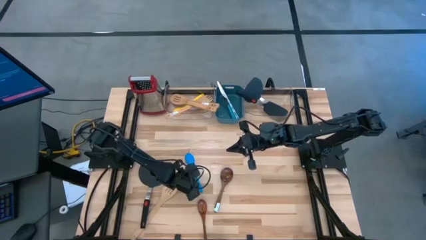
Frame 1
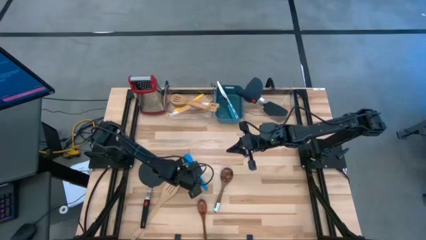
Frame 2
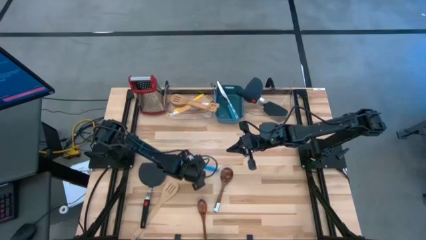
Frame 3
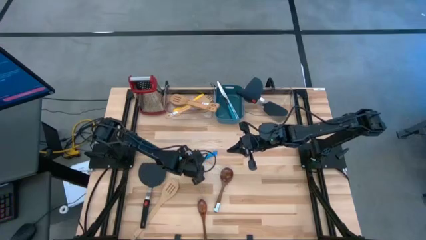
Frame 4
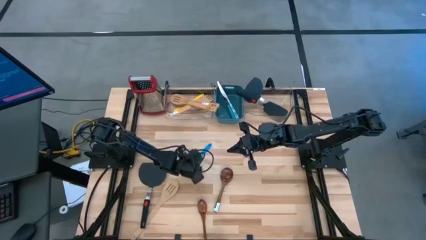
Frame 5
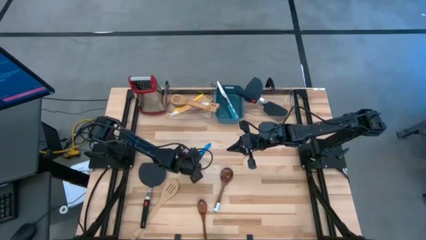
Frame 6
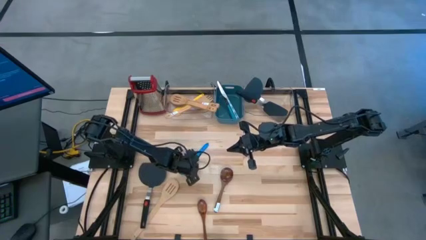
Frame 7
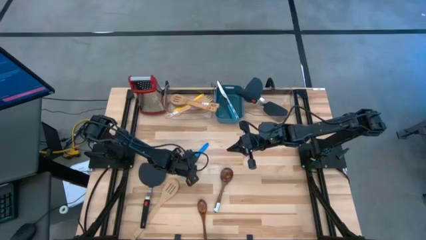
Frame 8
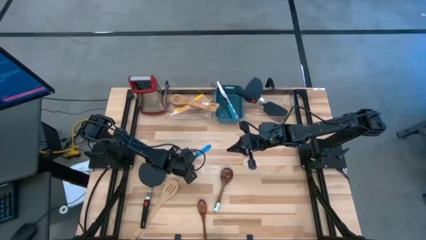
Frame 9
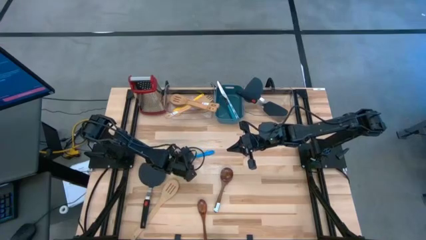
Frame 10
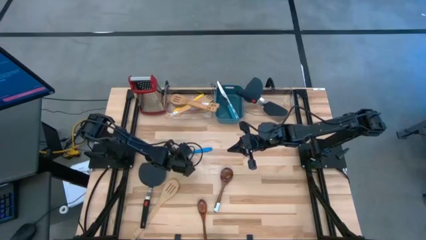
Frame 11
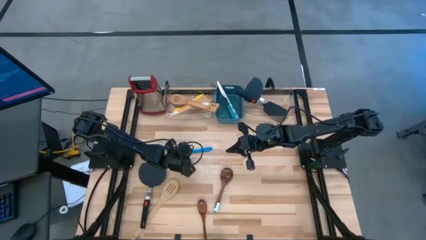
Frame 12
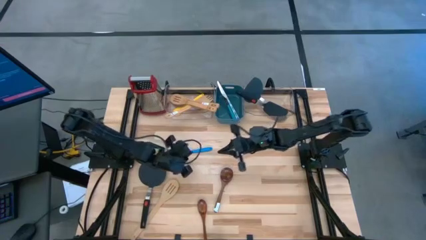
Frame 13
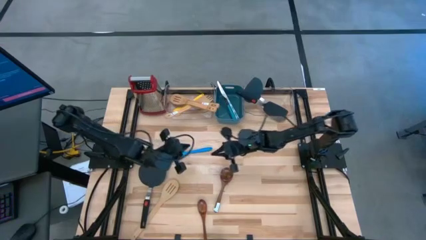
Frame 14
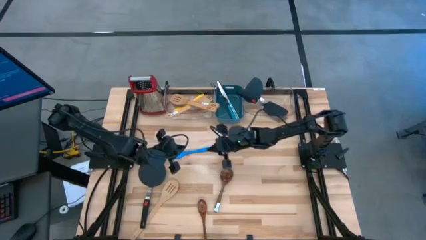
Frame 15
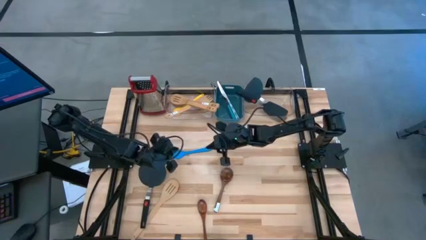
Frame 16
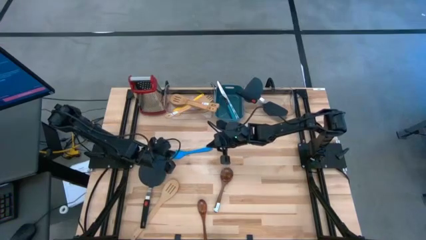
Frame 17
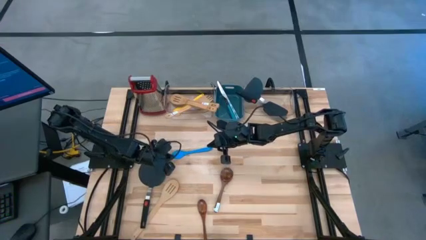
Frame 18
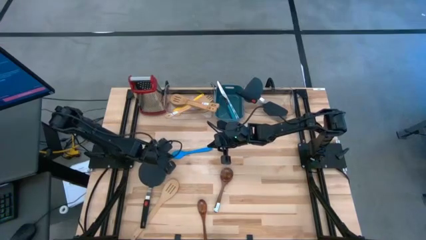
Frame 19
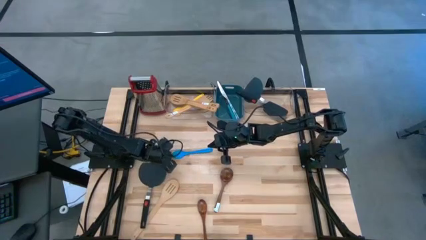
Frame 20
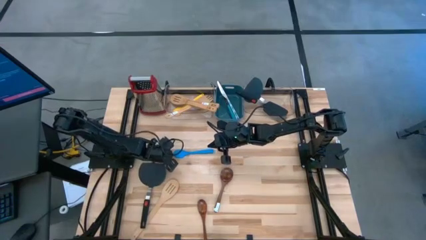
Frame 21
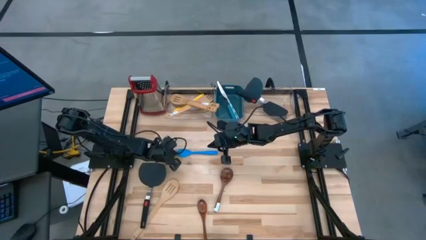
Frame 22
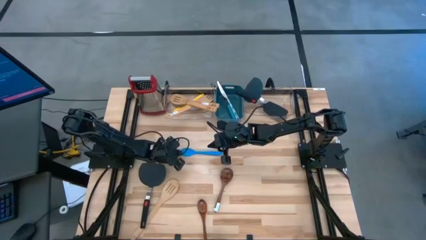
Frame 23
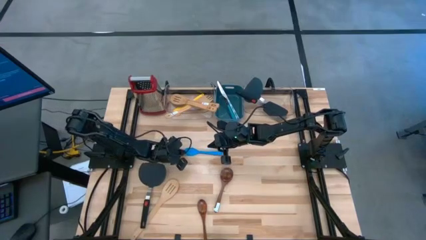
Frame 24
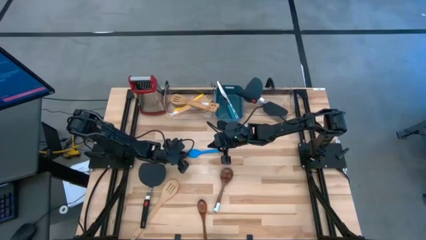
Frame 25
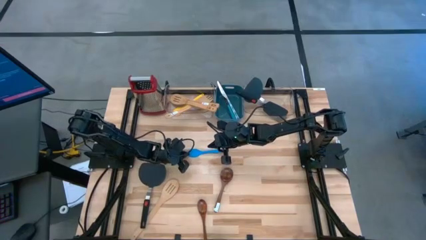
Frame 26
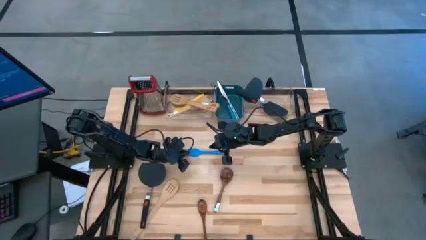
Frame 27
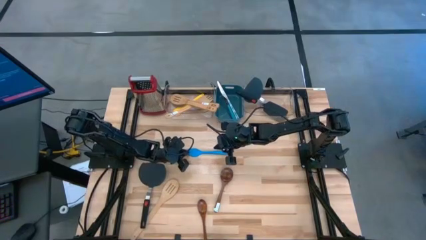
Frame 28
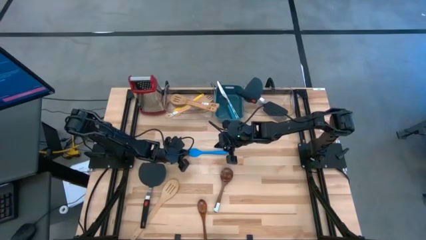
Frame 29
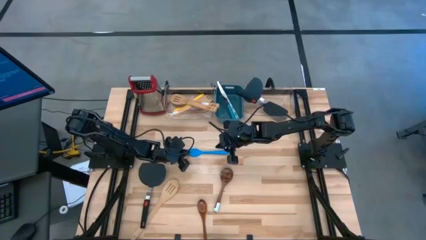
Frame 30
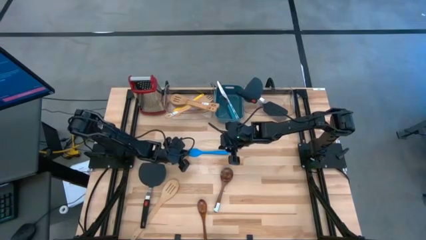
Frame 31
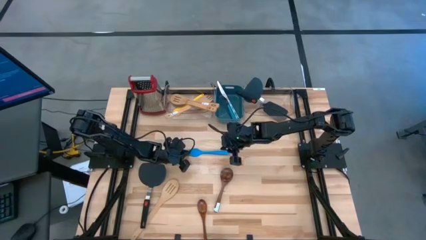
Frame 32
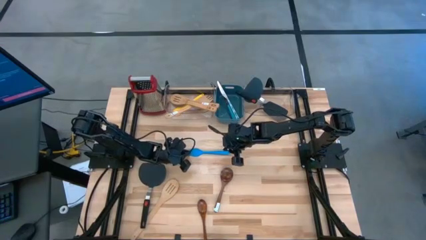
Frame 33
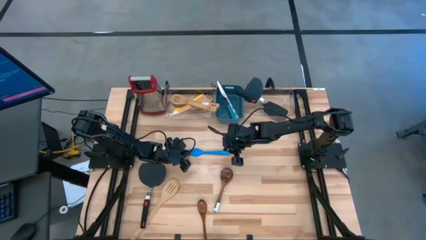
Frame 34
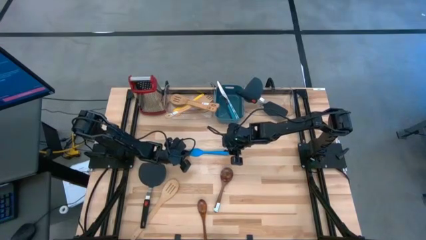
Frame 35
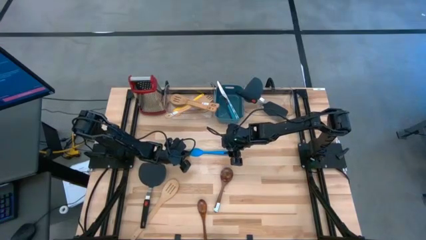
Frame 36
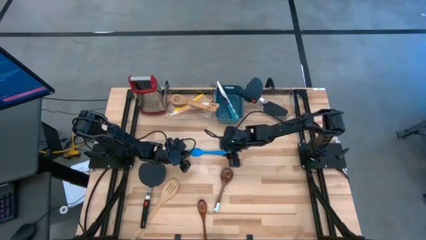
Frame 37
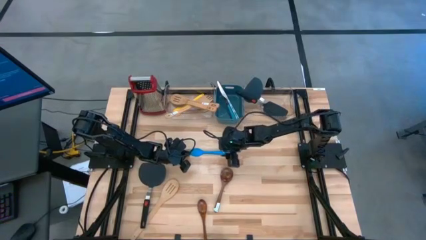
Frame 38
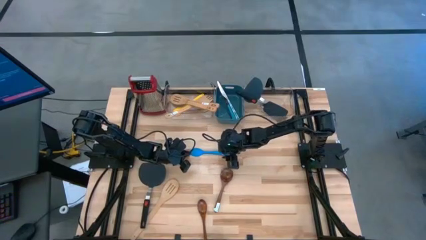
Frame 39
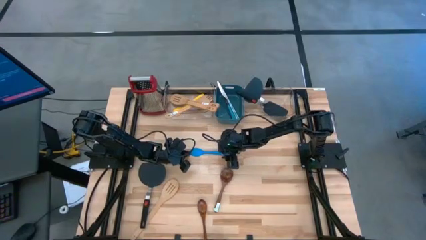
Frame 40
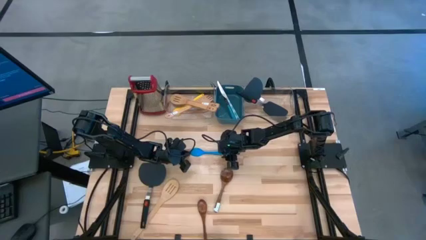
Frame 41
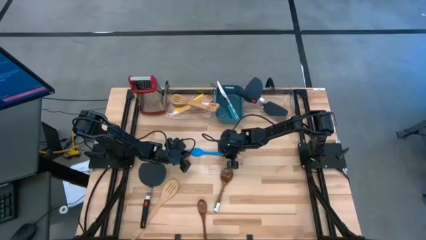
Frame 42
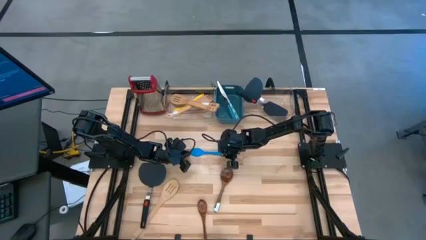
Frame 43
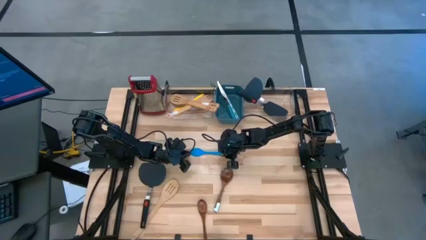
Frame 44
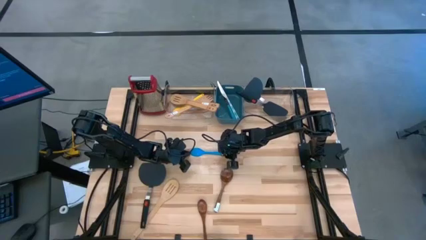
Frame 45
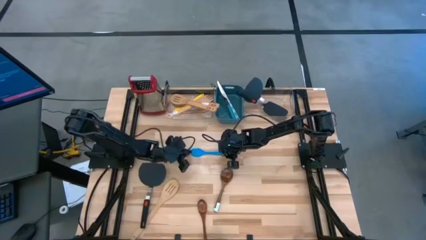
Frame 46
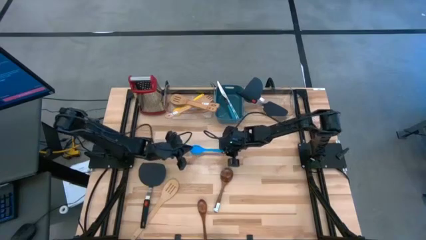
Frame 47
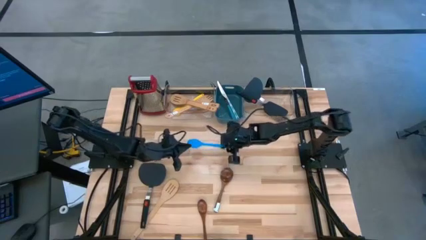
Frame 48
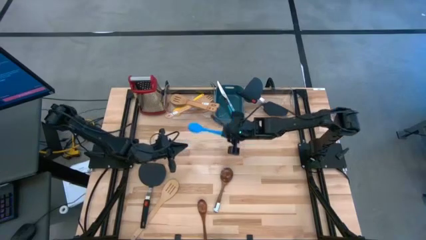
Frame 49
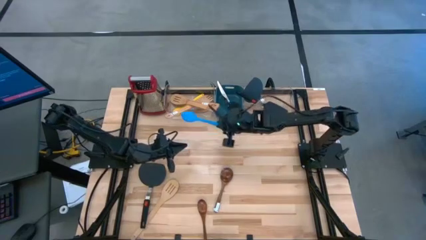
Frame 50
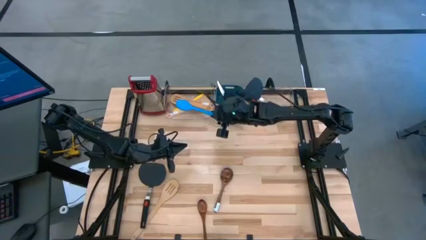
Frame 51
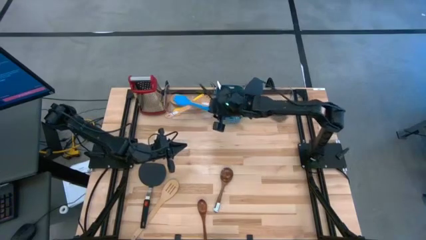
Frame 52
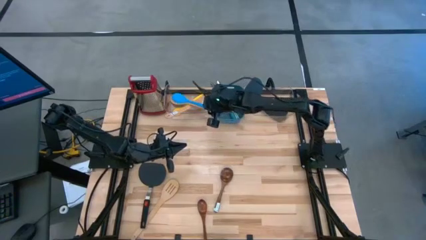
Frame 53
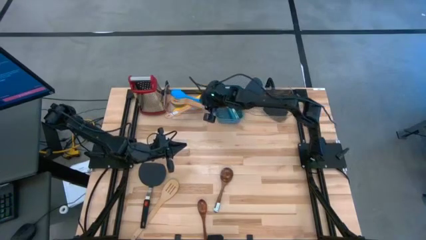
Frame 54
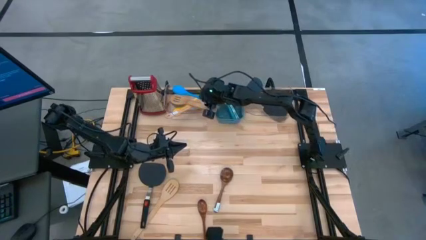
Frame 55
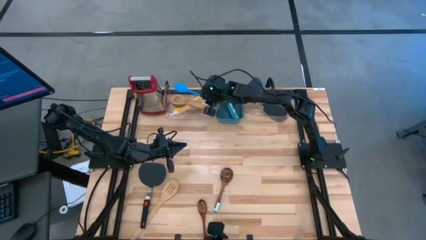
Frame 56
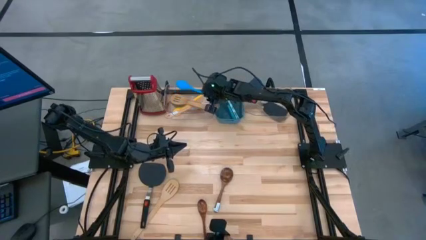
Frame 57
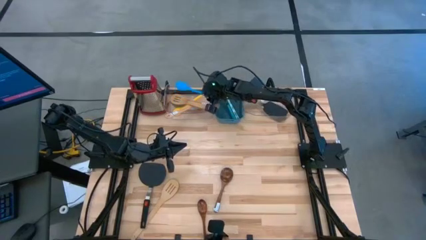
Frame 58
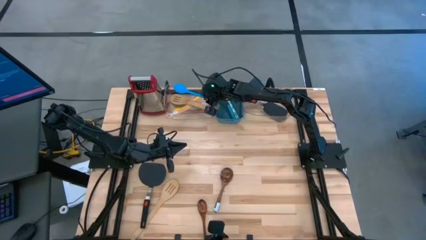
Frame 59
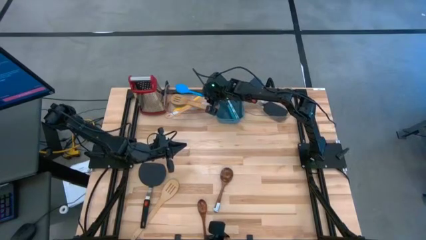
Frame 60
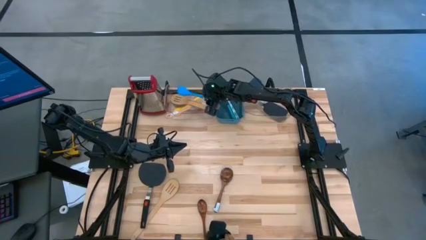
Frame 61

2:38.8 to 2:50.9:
Task: Pick & Place Kitchen Items
Put the blue serving spoon into the left transparent bin

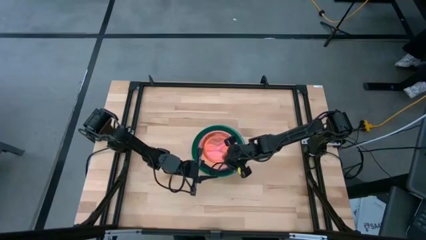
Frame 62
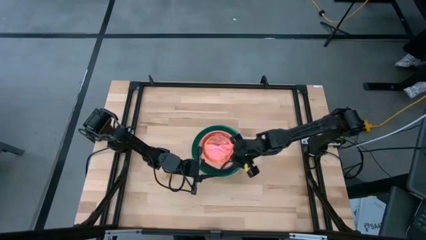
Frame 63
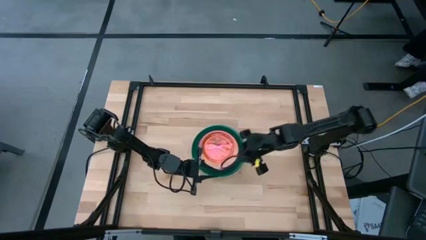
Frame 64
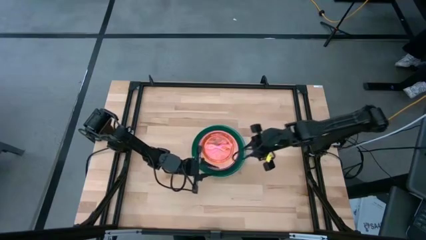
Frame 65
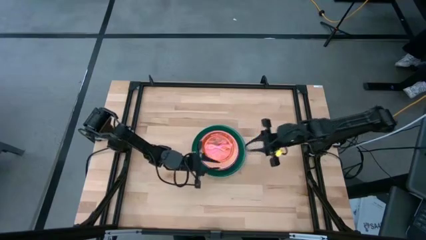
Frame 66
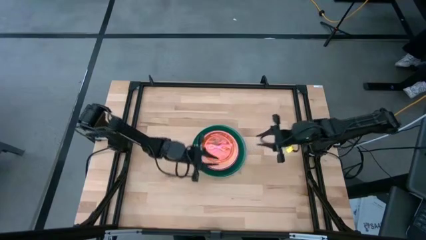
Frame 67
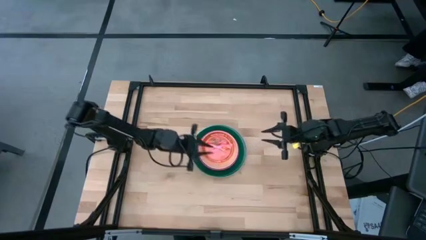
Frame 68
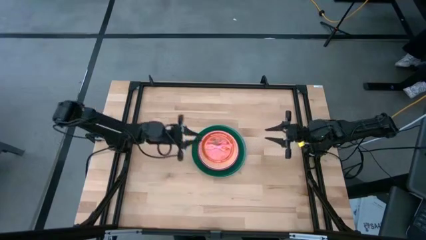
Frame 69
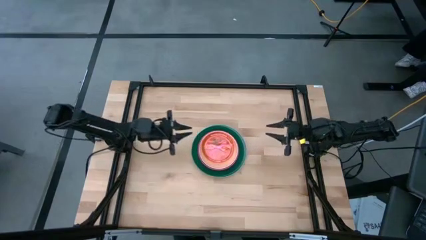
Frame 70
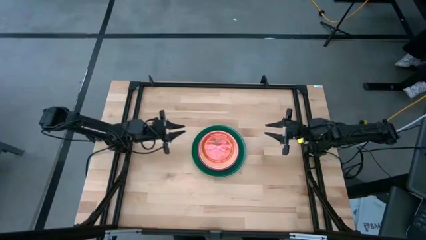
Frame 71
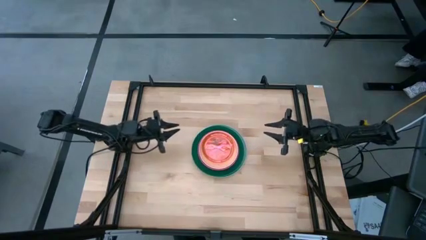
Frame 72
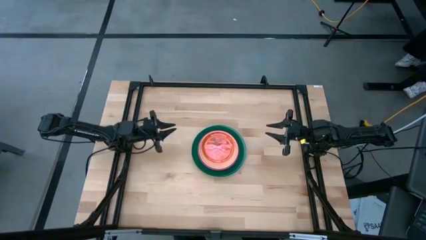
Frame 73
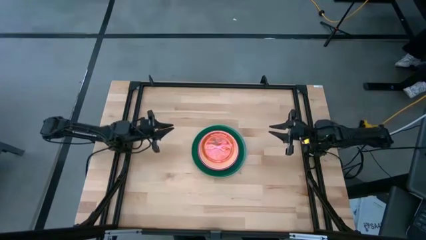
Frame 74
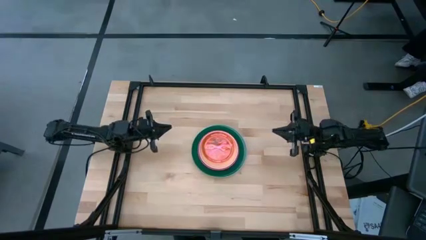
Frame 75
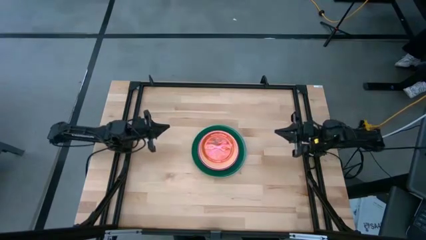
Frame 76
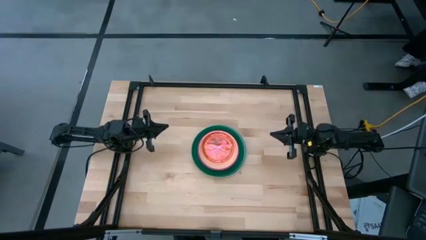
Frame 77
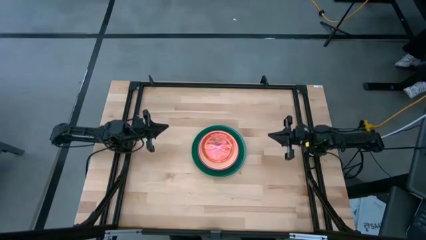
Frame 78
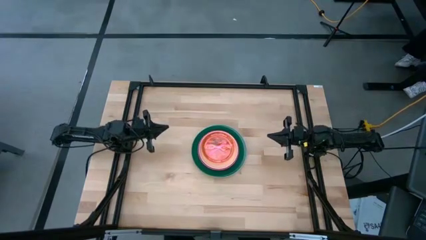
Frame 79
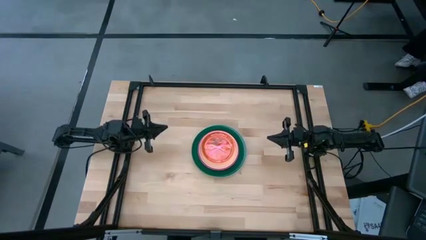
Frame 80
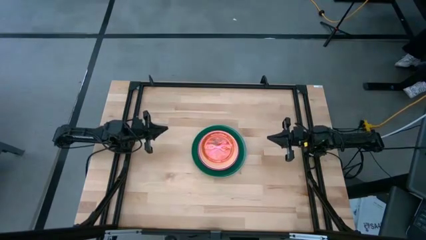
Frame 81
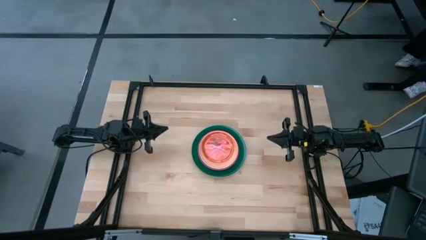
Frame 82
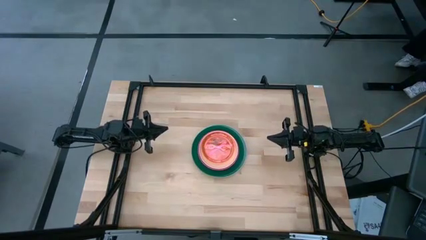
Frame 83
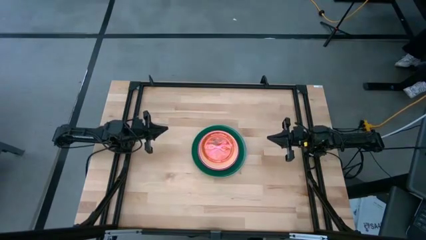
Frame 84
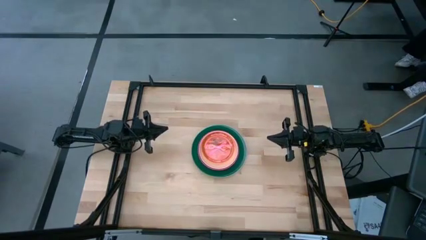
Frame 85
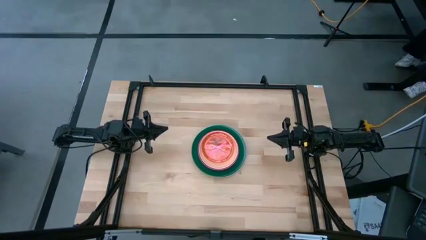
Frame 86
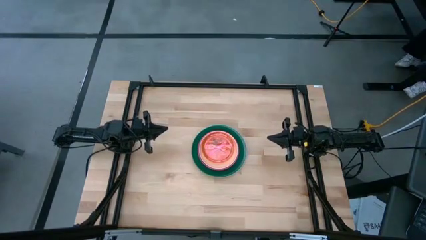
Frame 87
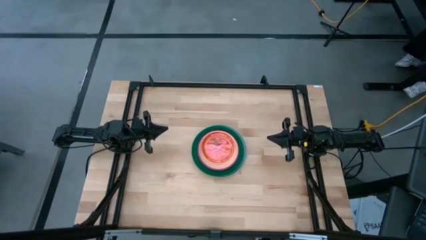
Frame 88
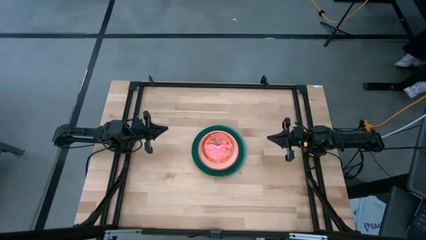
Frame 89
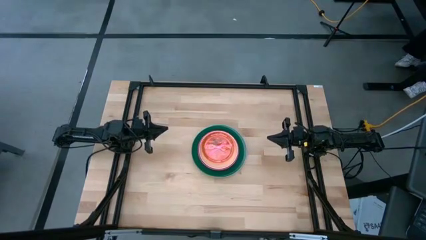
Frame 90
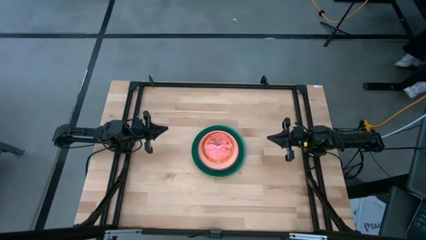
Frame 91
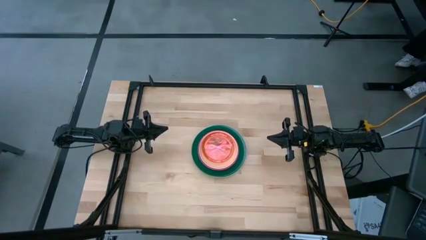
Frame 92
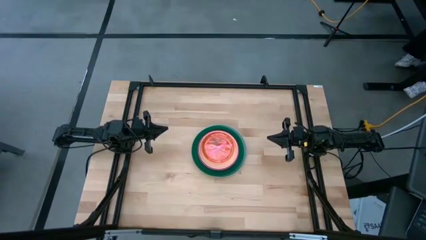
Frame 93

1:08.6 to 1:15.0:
Task: Stack plastic plates
Return to Home Position
